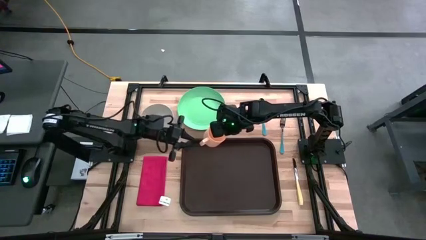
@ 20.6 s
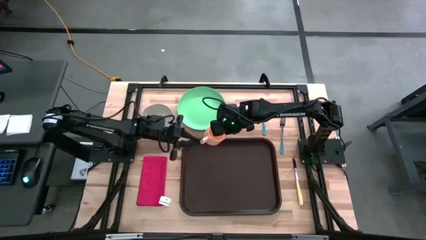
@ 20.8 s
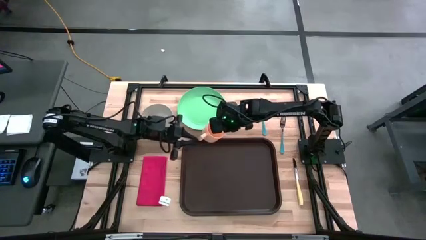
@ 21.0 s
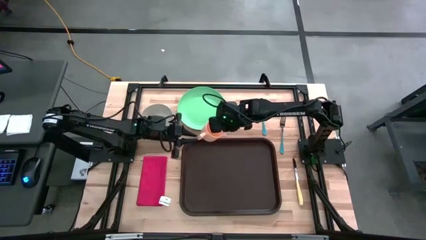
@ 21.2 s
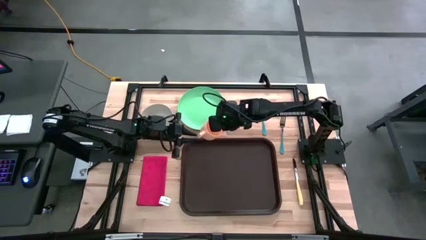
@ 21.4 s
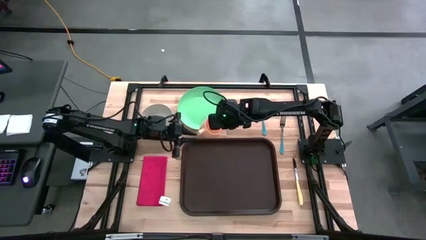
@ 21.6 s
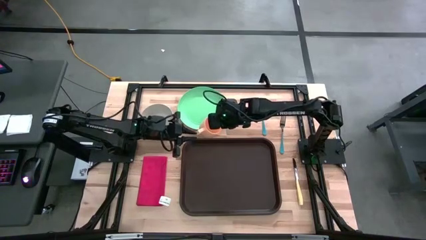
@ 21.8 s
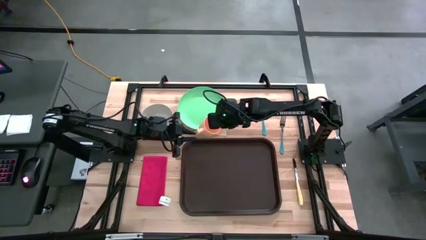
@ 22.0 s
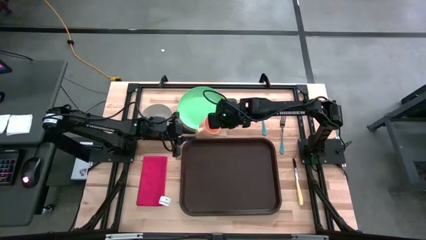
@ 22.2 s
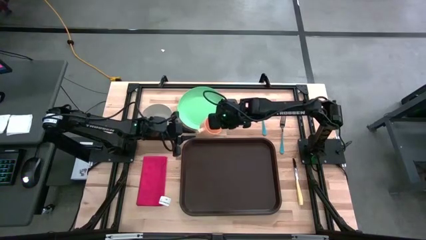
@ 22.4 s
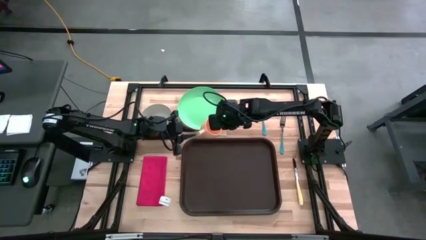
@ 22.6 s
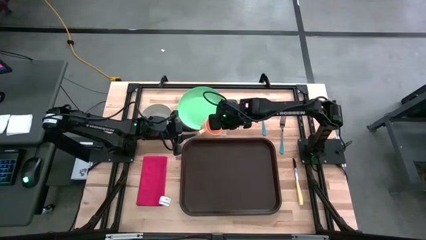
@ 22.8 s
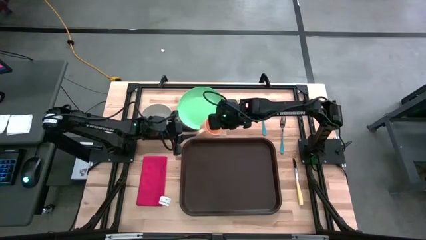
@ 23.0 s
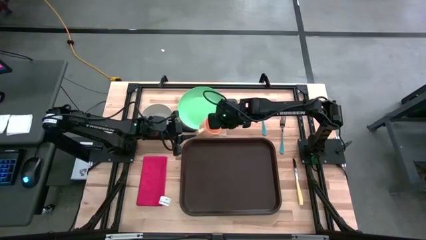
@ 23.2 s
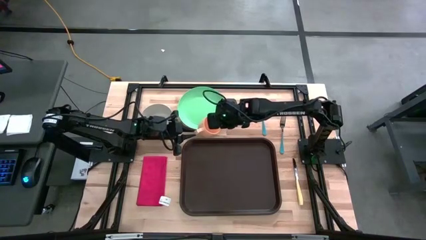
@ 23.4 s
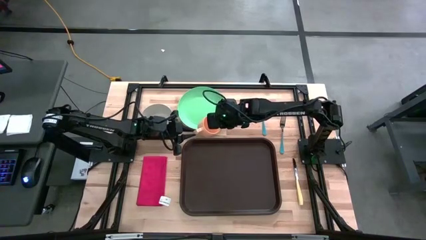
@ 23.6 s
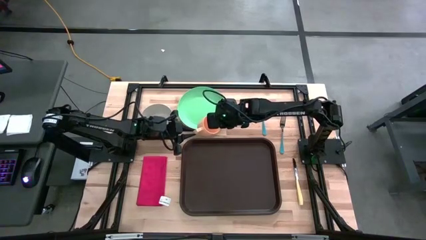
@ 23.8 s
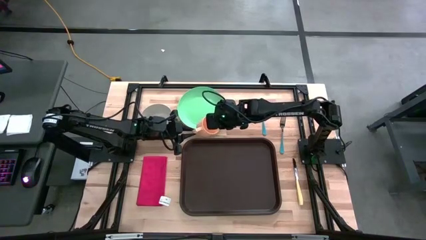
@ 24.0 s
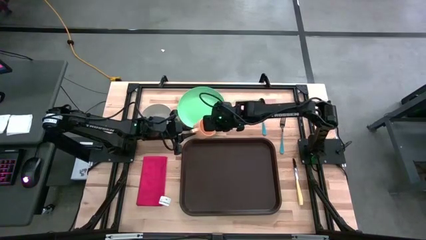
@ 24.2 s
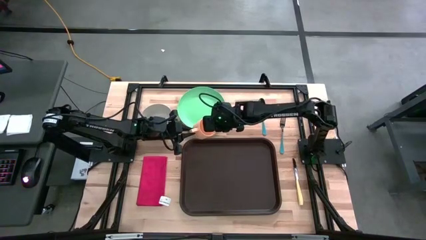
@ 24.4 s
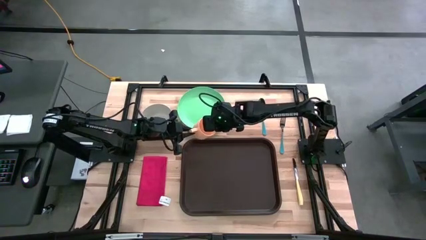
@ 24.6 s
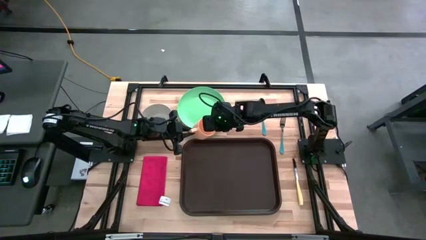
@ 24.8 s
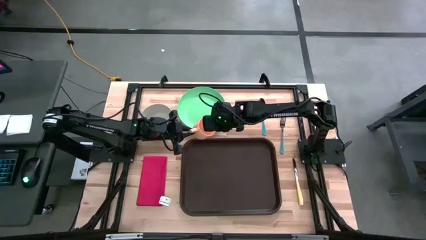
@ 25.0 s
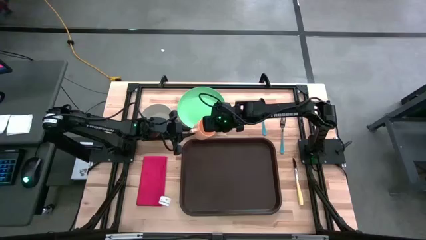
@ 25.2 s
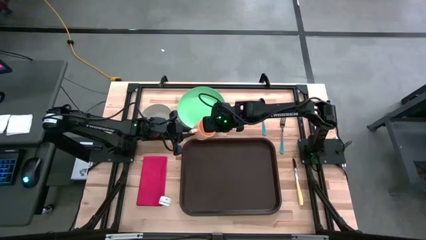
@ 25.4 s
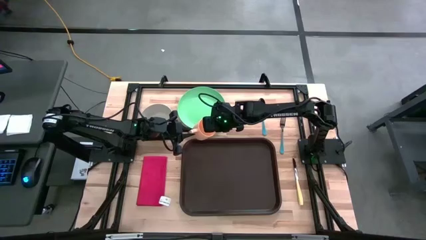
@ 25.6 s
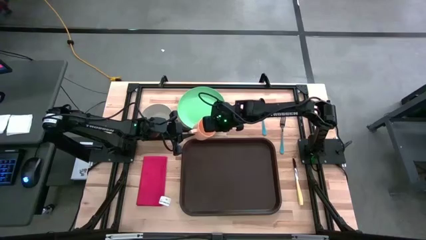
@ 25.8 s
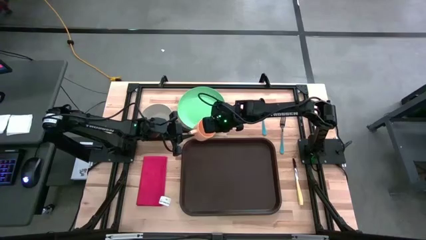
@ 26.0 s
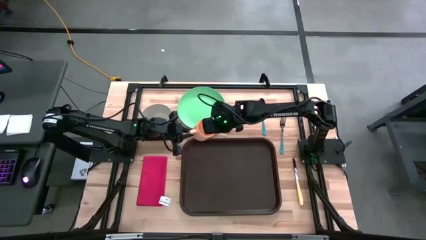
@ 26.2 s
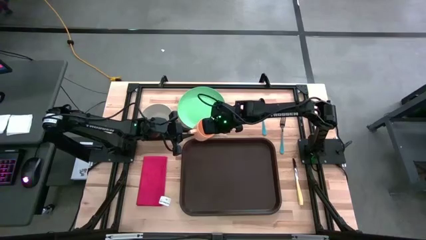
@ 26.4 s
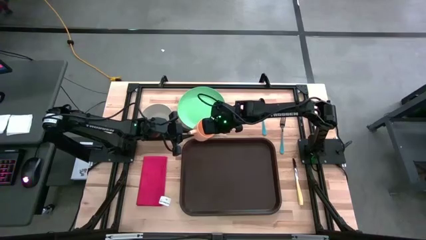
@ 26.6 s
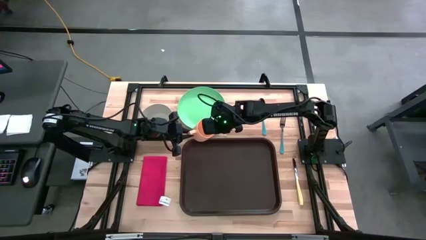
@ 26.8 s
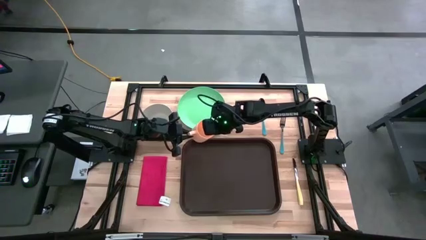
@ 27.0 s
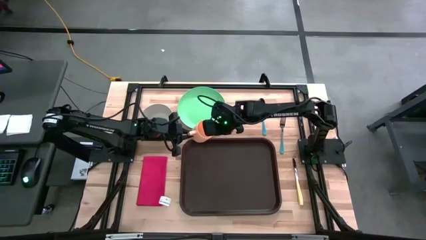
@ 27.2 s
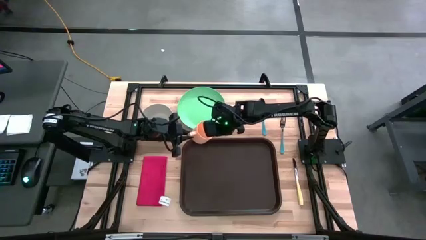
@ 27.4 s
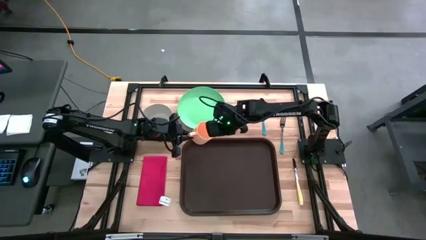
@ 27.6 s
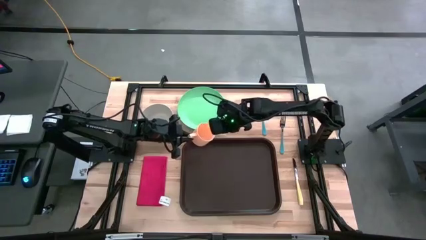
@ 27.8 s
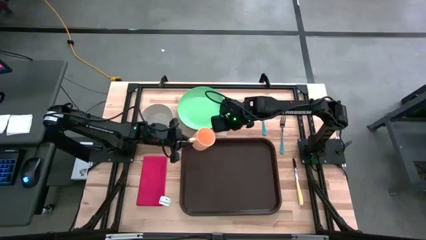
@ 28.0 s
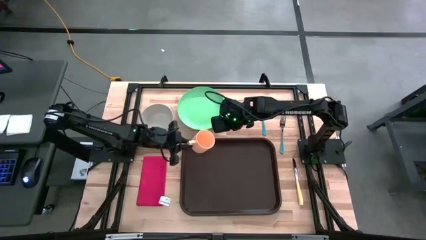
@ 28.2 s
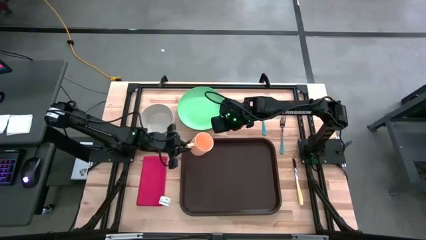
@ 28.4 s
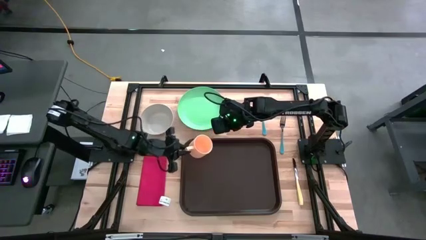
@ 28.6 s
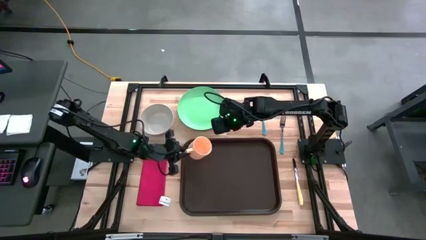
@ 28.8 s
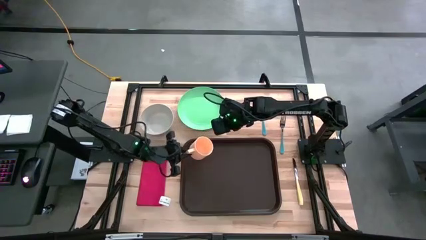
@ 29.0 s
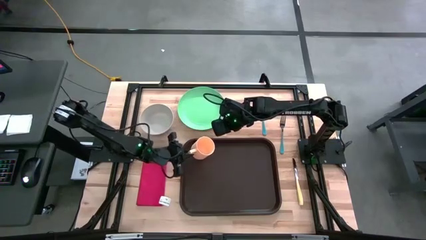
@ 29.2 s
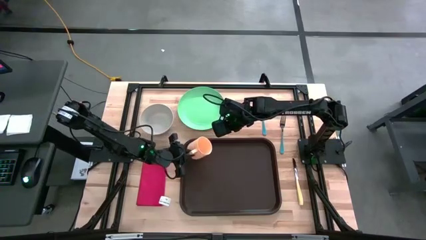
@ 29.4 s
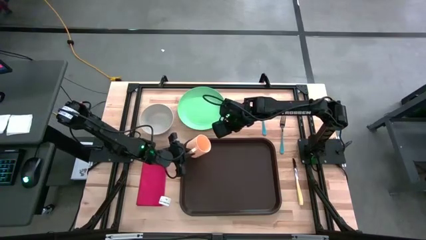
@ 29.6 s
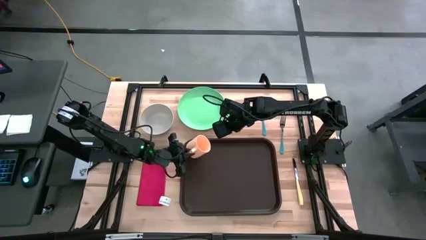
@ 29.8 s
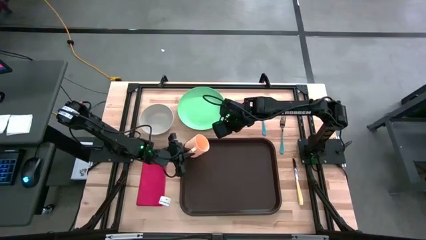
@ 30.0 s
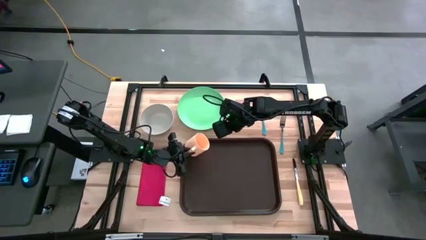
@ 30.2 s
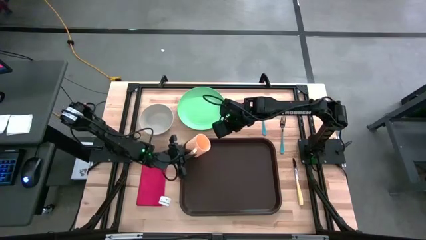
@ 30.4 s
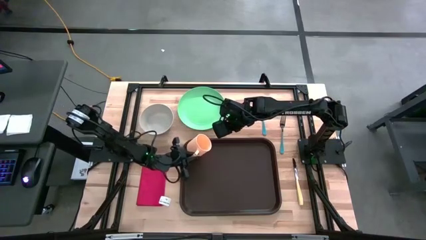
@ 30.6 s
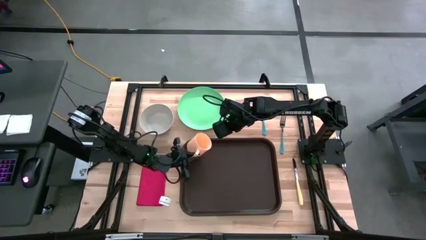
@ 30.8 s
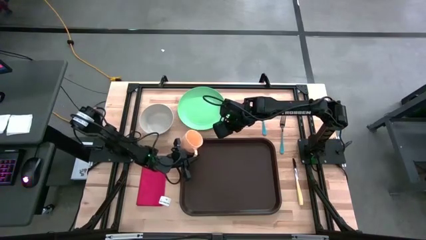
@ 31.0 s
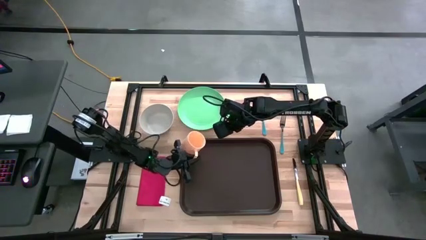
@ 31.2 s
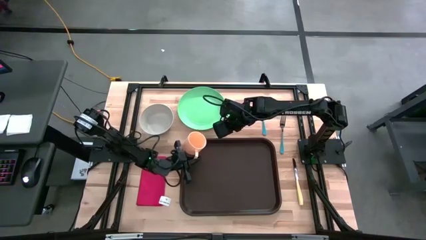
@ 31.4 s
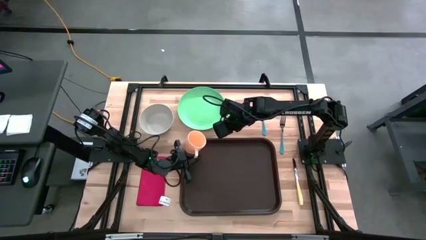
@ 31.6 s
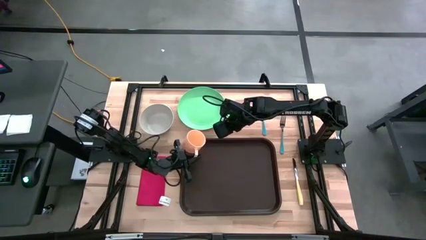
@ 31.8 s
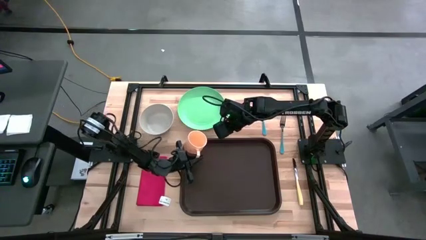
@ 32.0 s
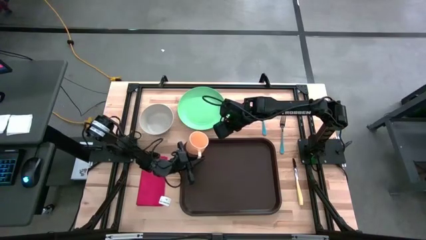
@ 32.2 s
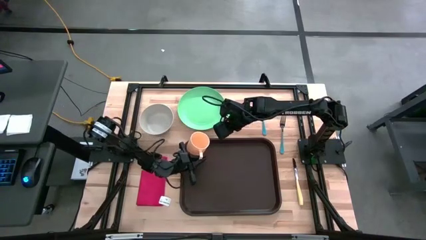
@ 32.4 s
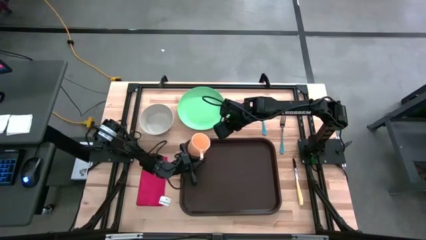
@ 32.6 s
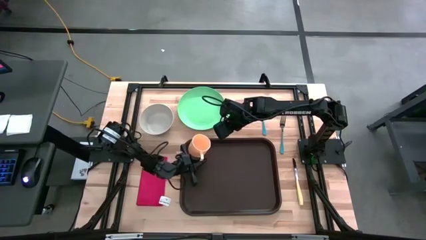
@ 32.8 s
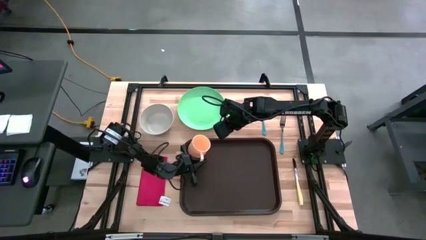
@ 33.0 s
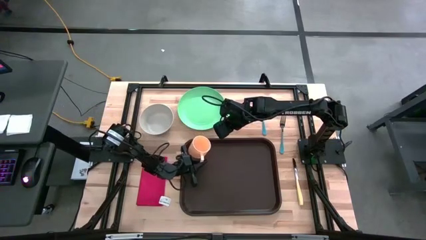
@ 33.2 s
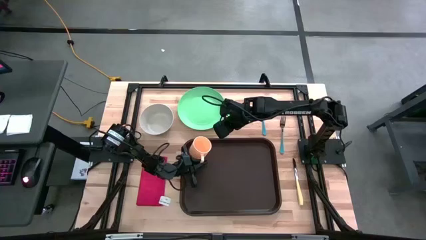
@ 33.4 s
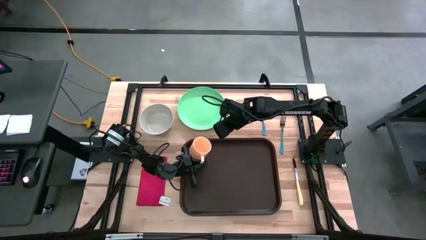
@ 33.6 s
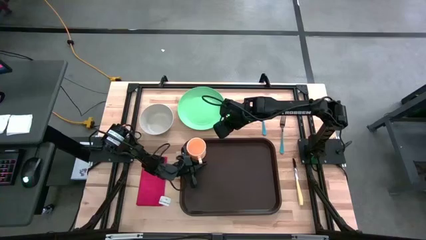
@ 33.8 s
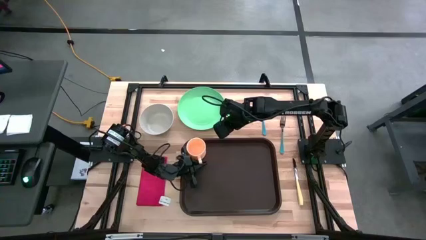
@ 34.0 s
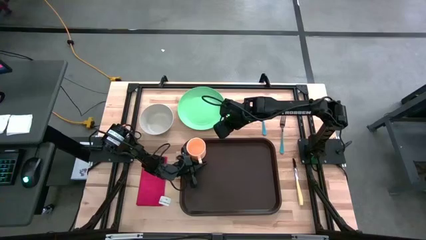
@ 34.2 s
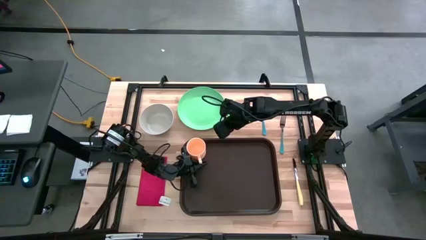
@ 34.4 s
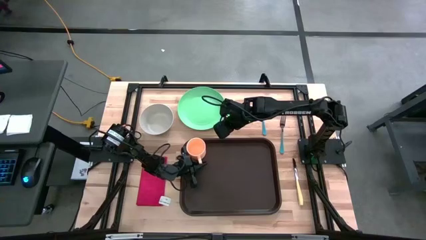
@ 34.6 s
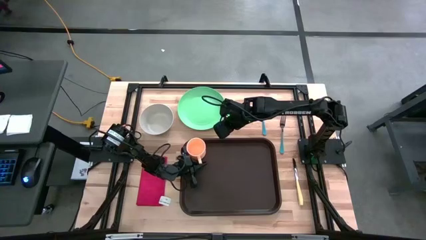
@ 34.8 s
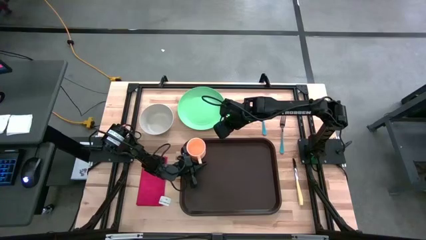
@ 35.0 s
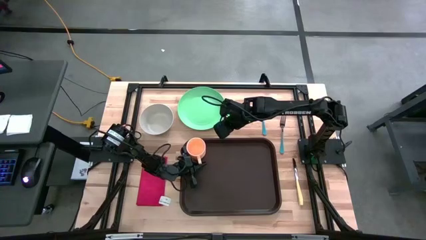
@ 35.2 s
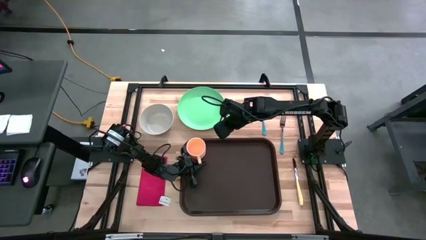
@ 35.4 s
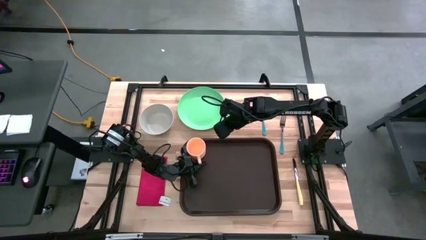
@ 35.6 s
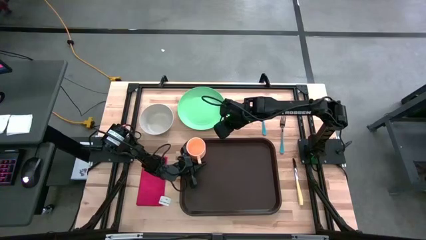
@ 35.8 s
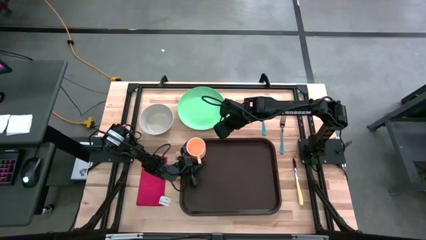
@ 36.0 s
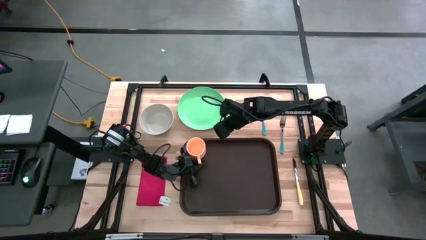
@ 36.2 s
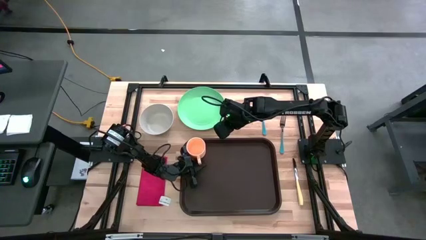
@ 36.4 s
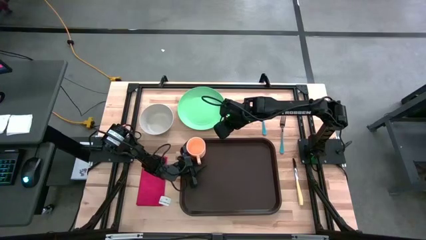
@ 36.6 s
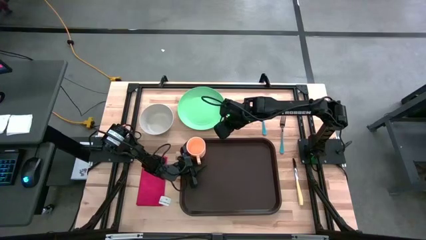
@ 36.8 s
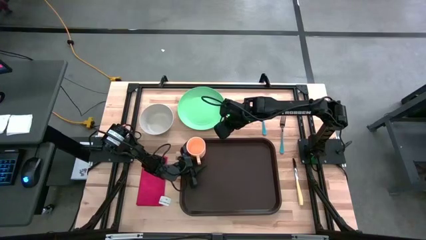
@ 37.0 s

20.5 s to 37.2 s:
Task: Set up tray
Put the orange mug on the top left of the black tray
